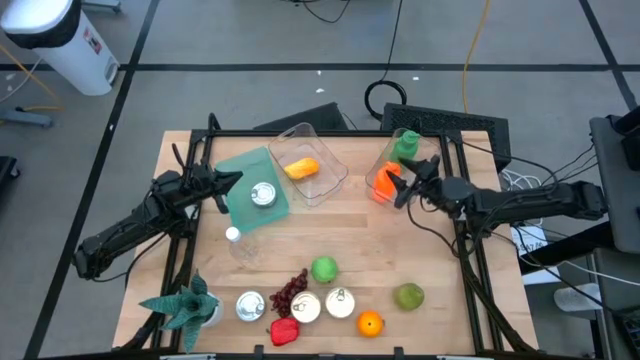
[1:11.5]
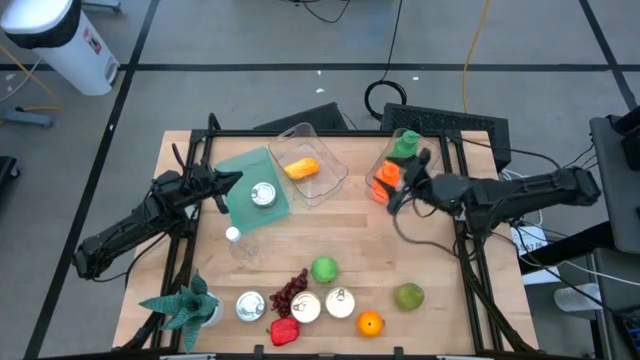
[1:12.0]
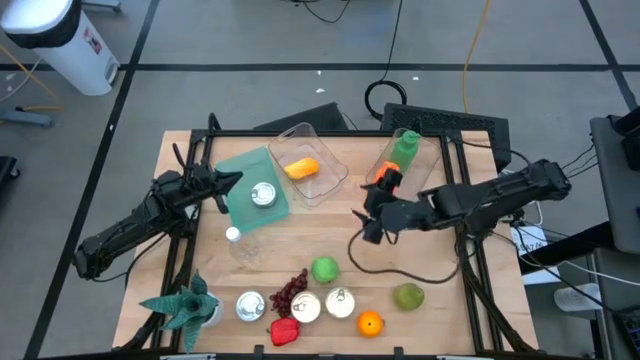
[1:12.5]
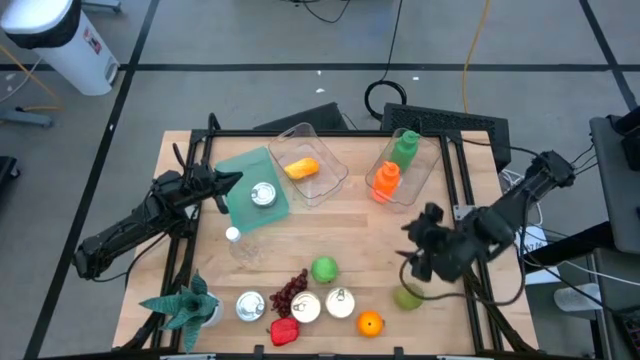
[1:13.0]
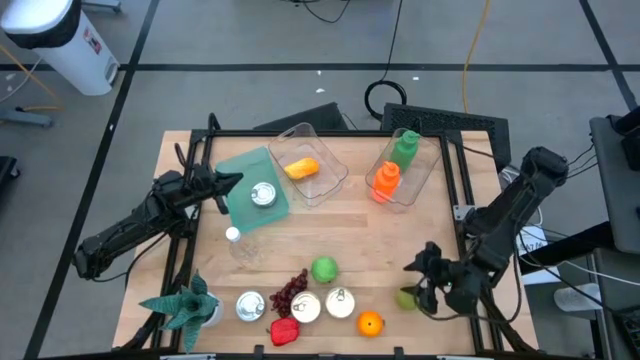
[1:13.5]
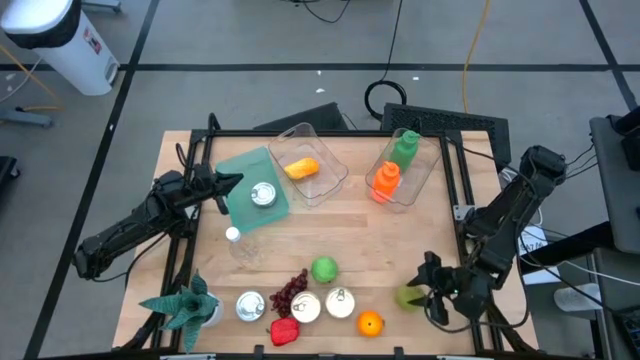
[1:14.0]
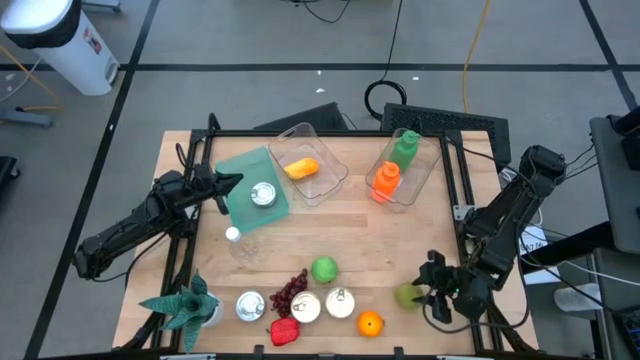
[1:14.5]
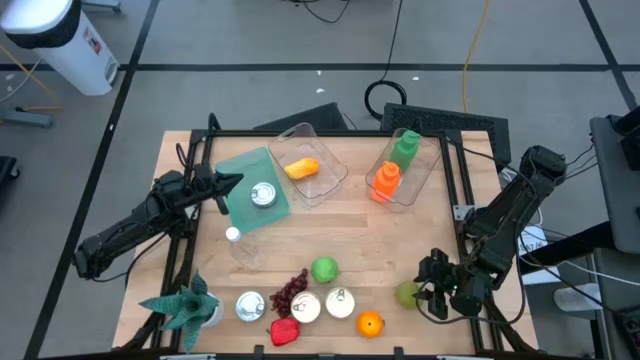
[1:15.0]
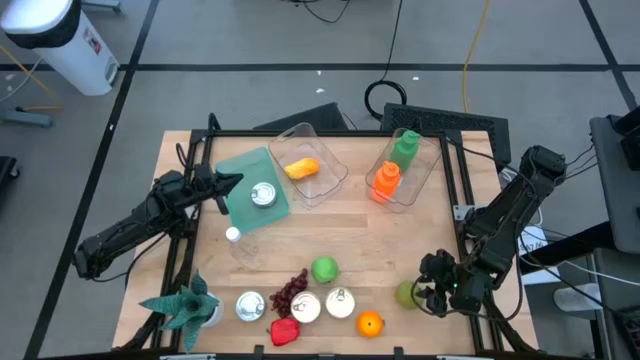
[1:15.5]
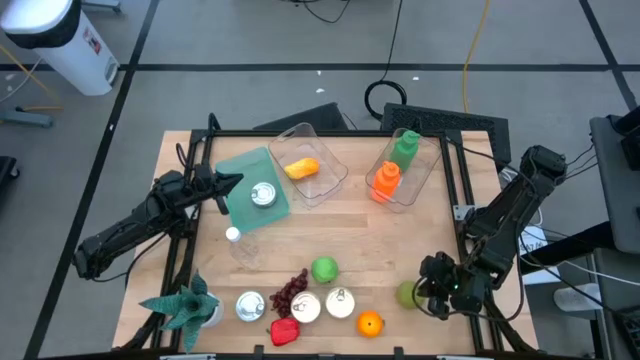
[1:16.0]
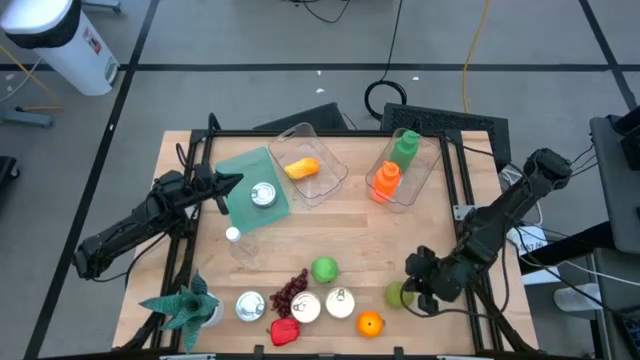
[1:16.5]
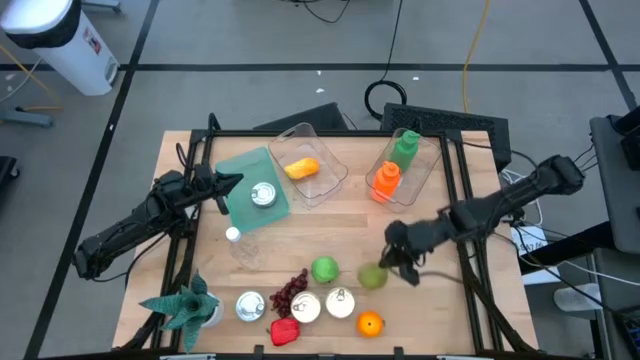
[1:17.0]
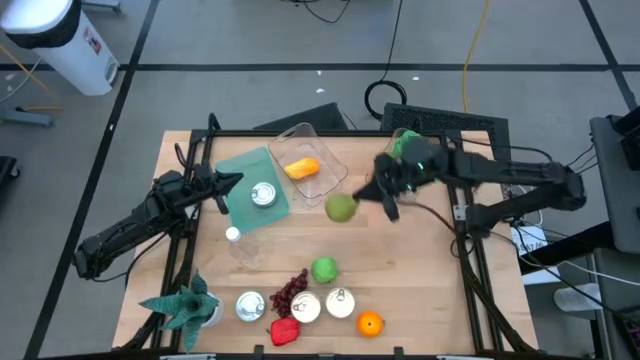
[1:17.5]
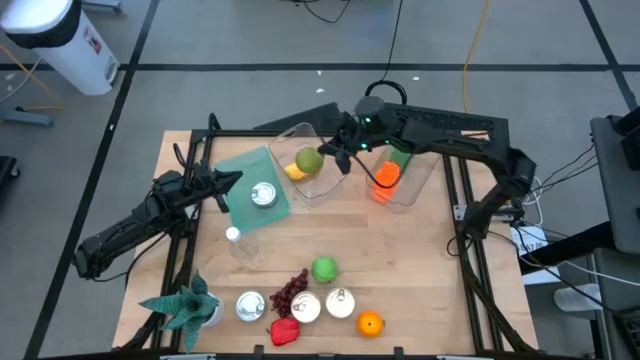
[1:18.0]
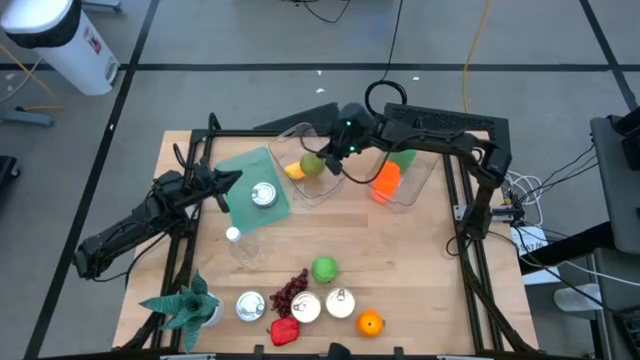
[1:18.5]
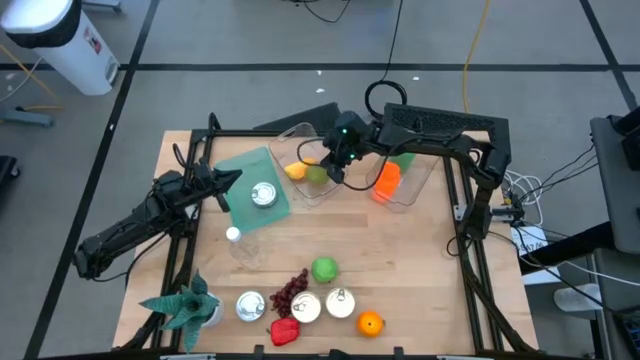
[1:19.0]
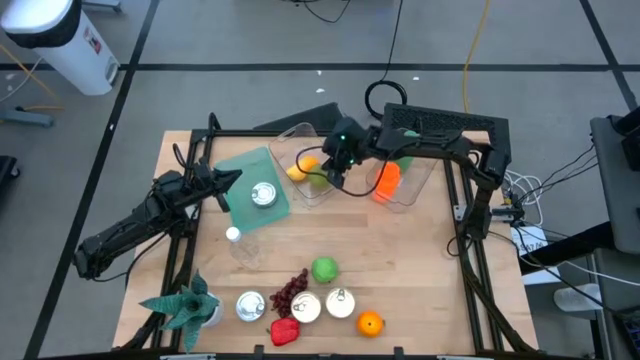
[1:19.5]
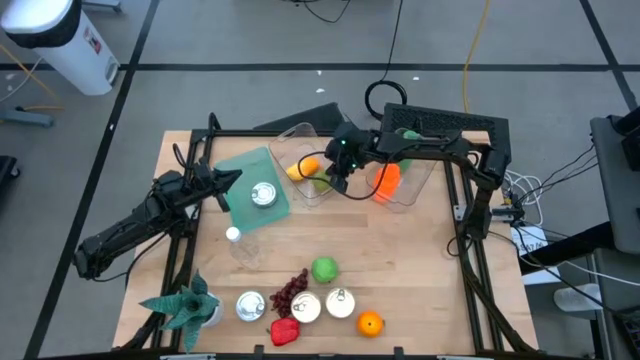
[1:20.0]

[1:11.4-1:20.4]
Task: Pick & Place Food Item
Put the green pear into the left transparent bin

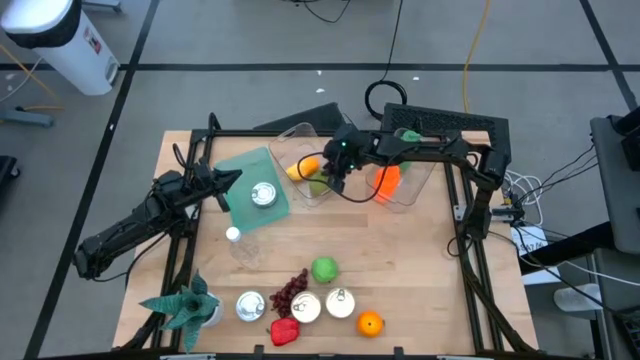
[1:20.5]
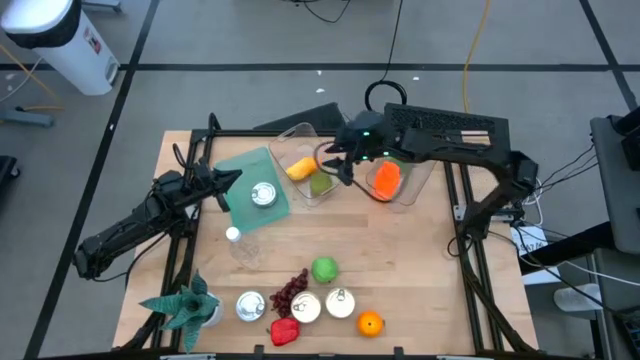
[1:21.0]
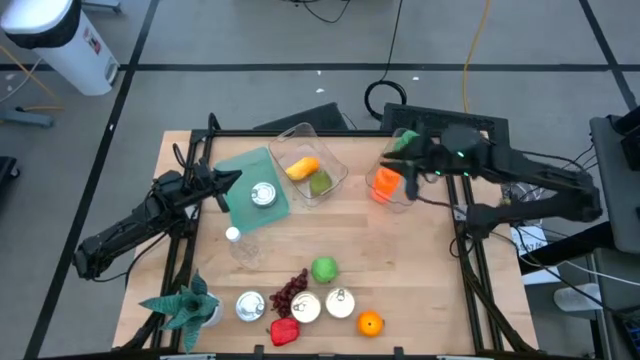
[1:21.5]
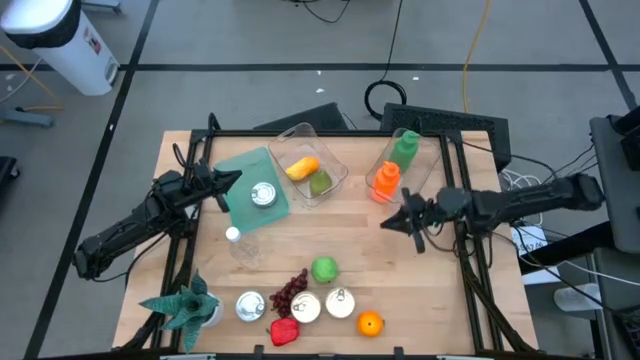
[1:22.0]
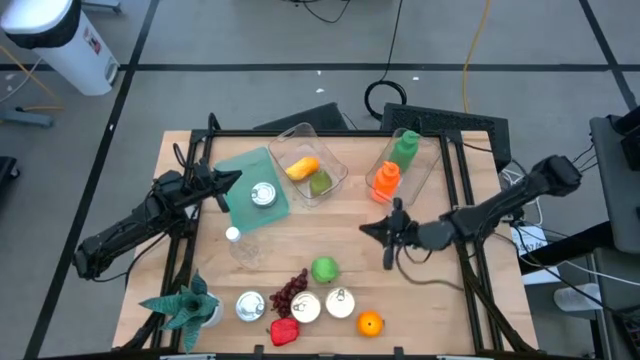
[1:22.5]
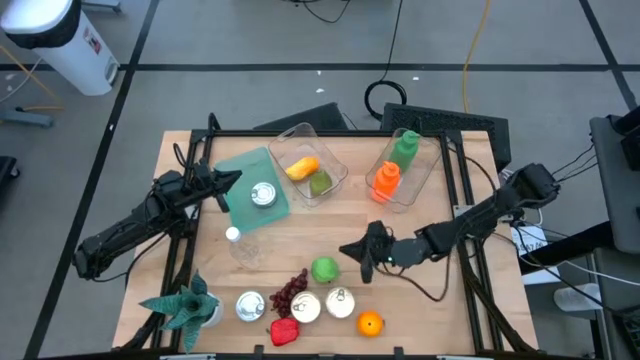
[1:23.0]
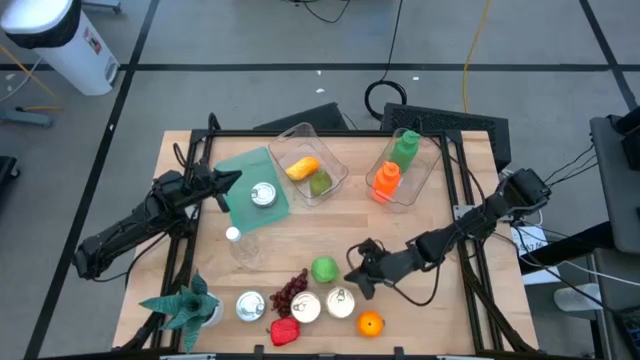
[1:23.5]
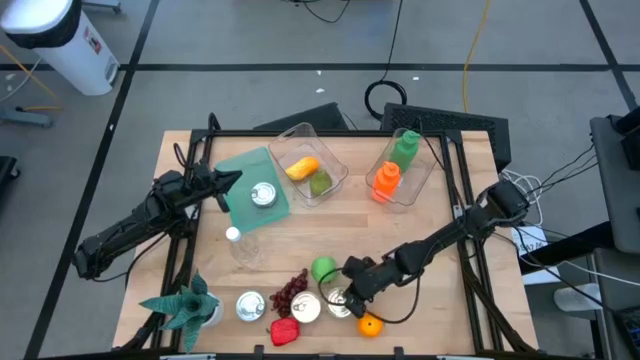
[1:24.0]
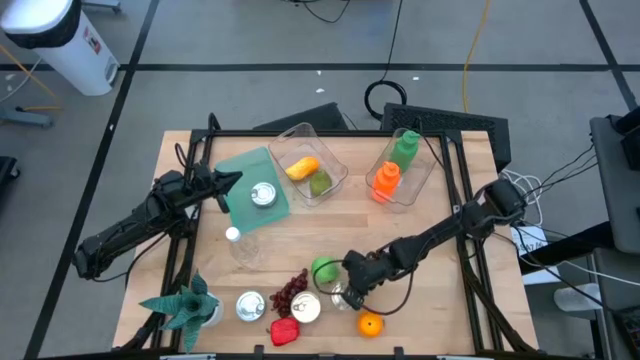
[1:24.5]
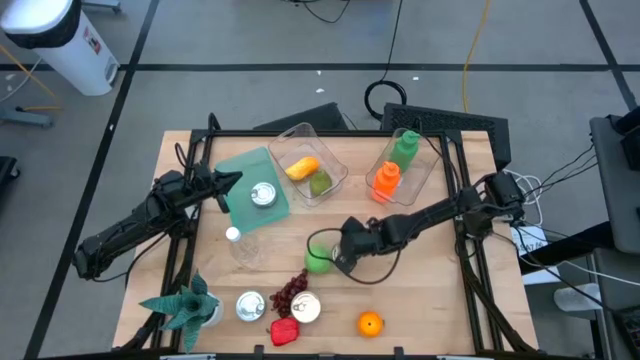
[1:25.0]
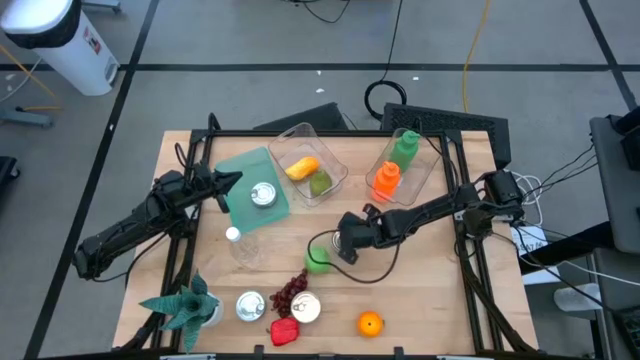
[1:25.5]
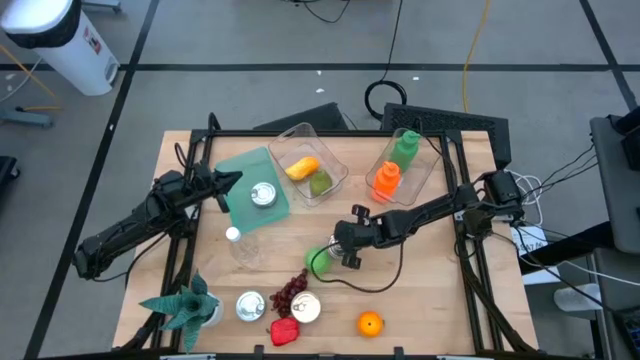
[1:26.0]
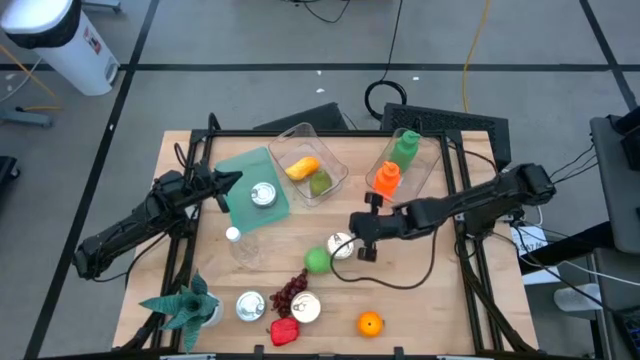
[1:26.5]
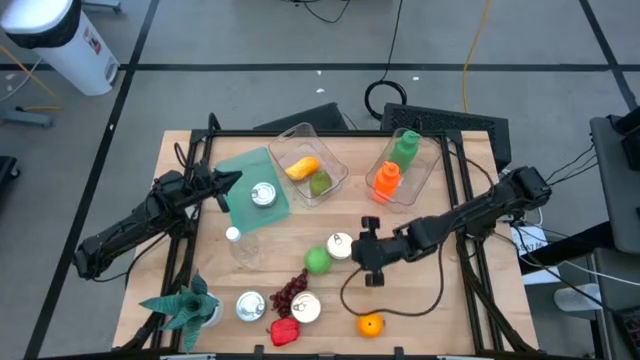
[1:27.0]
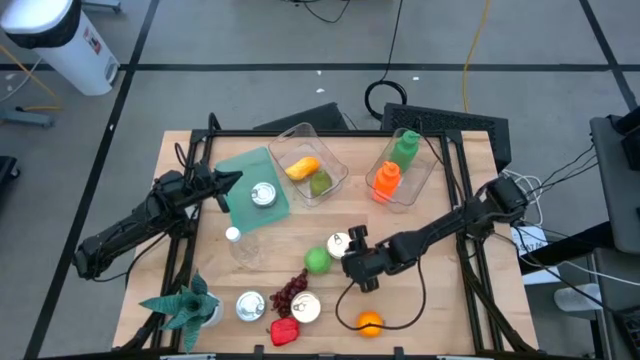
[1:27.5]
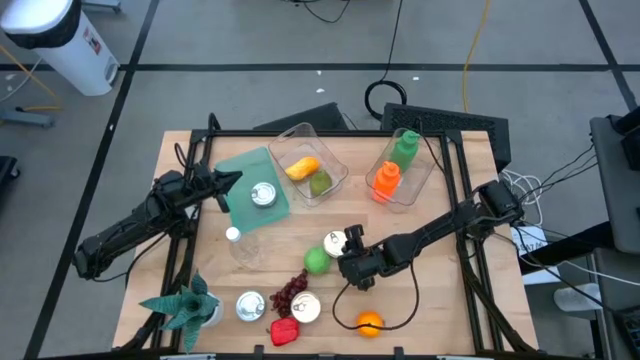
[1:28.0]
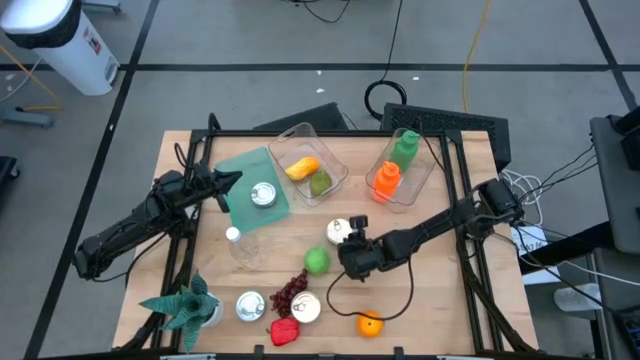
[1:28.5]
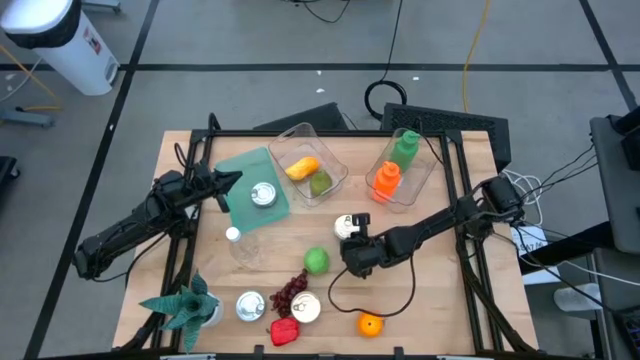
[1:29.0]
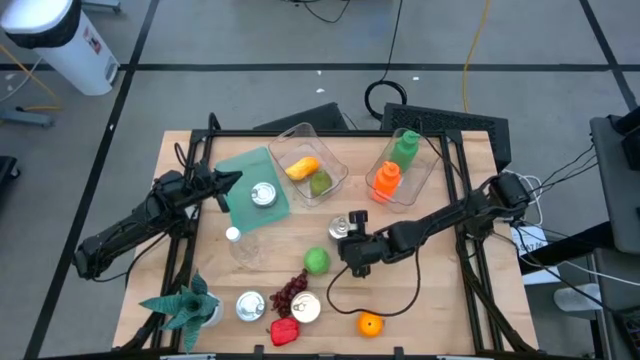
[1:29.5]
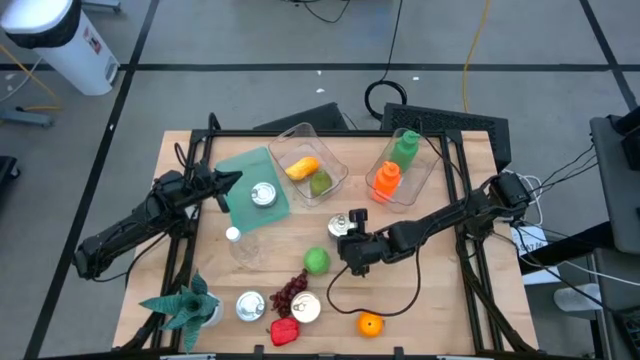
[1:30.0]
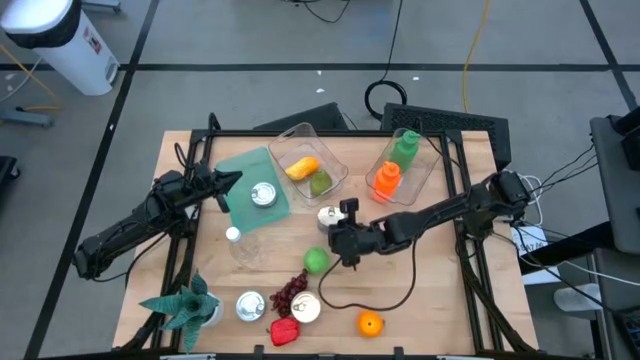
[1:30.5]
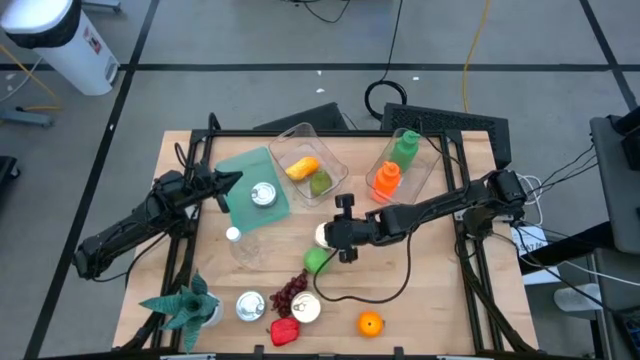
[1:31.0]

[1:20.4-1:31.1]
Stack the blue tuna can on the green tuna can in the green bin
